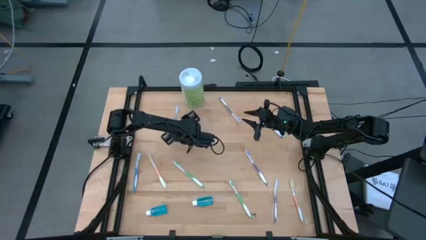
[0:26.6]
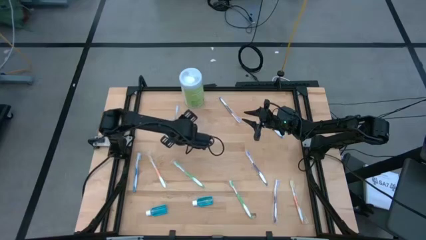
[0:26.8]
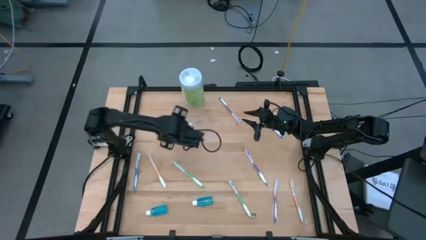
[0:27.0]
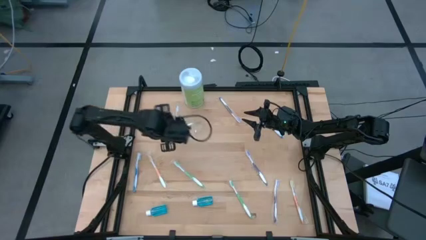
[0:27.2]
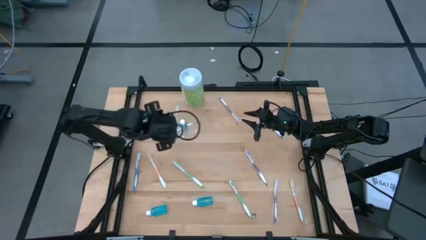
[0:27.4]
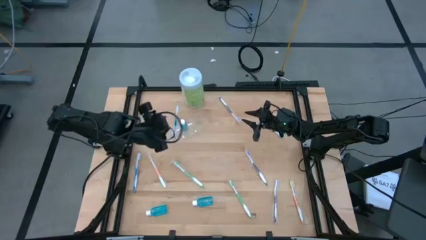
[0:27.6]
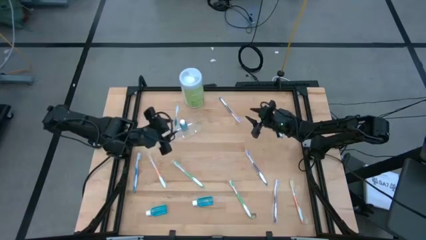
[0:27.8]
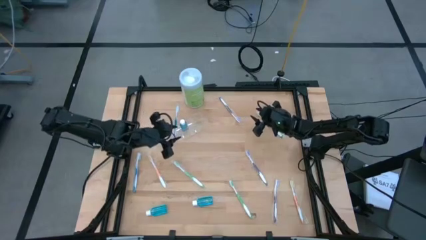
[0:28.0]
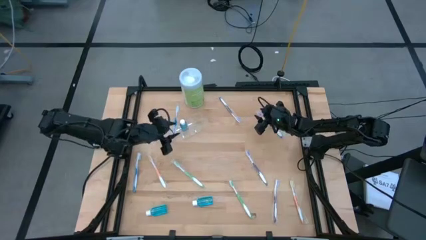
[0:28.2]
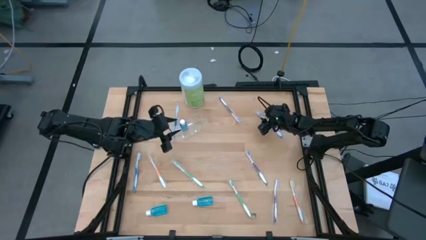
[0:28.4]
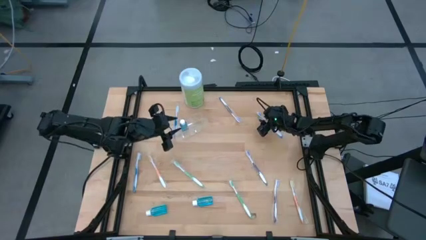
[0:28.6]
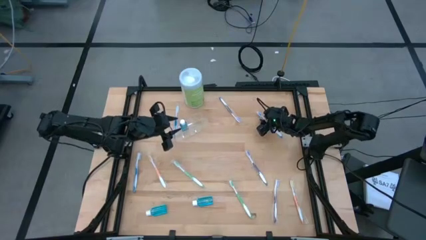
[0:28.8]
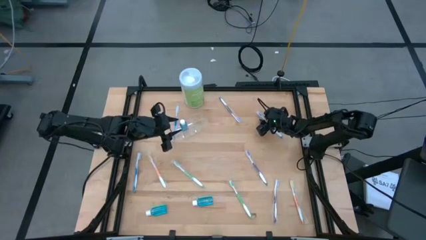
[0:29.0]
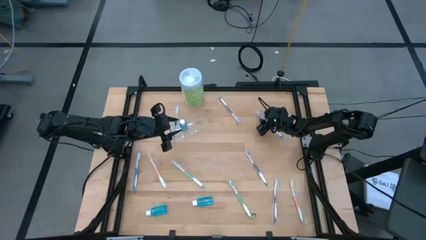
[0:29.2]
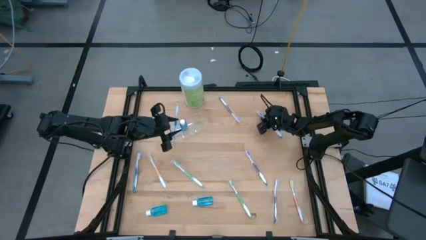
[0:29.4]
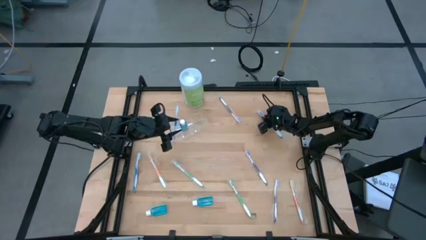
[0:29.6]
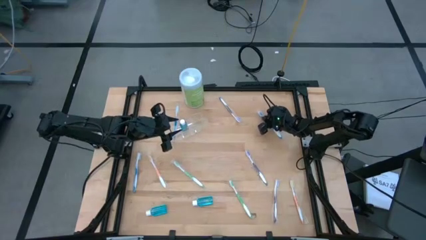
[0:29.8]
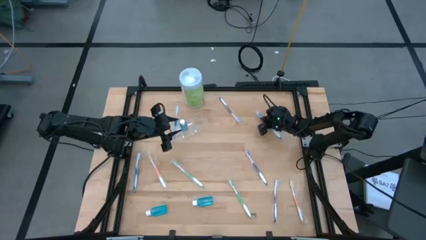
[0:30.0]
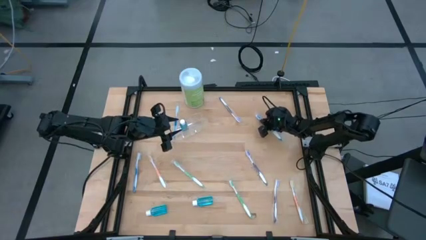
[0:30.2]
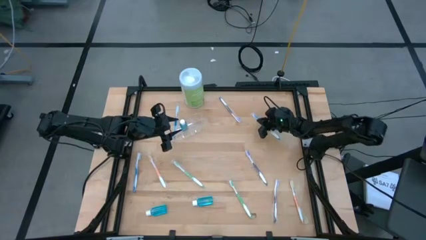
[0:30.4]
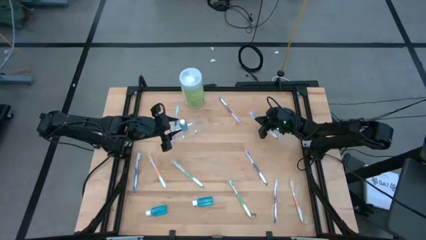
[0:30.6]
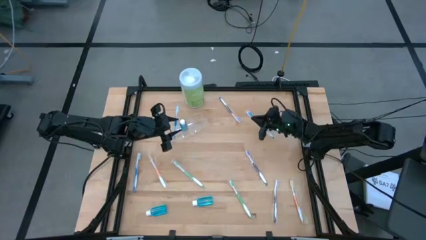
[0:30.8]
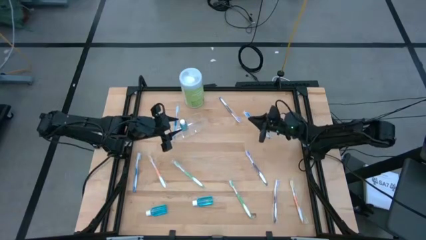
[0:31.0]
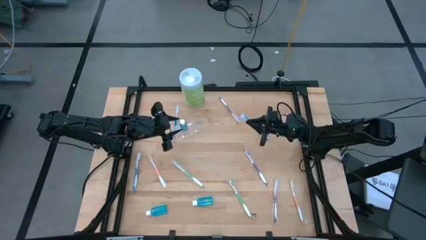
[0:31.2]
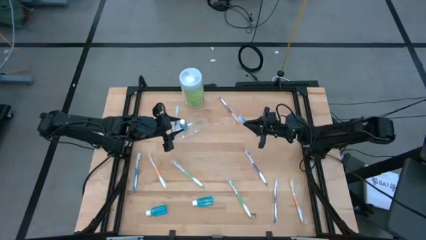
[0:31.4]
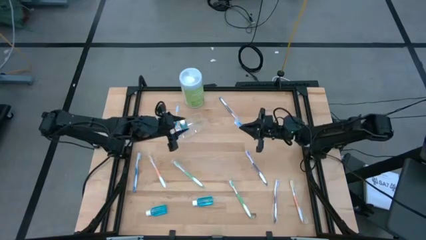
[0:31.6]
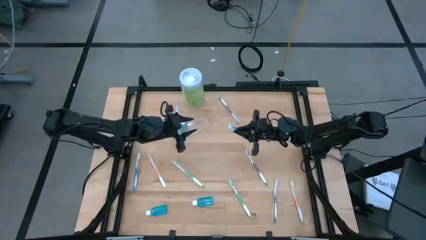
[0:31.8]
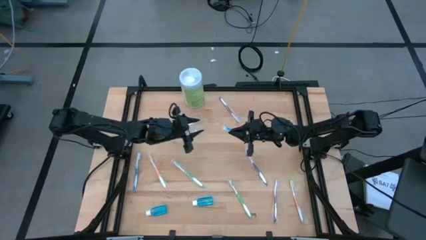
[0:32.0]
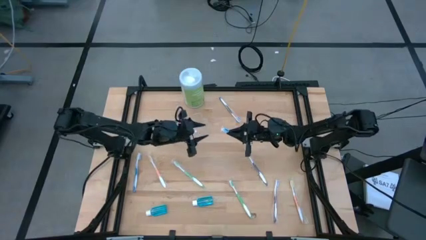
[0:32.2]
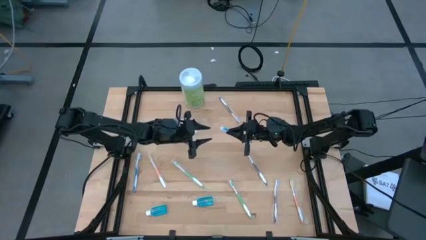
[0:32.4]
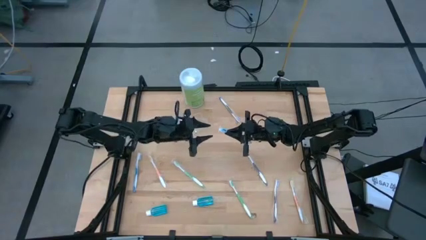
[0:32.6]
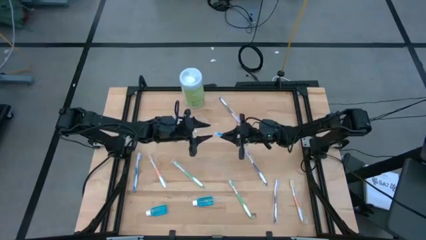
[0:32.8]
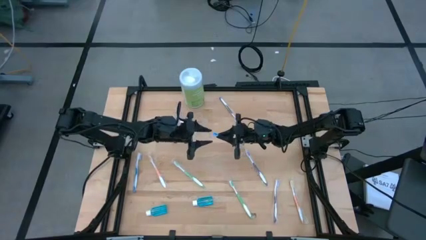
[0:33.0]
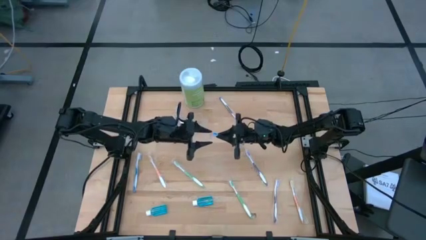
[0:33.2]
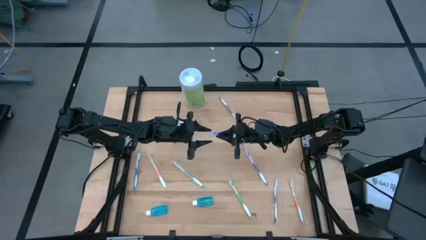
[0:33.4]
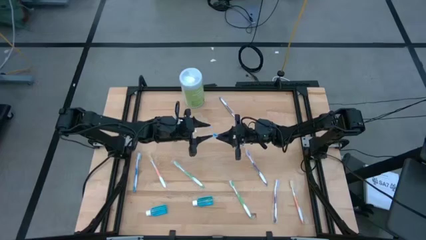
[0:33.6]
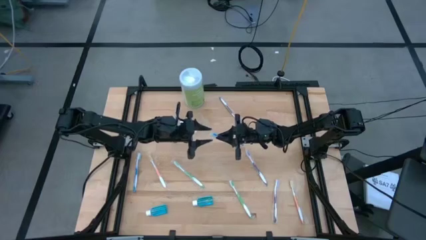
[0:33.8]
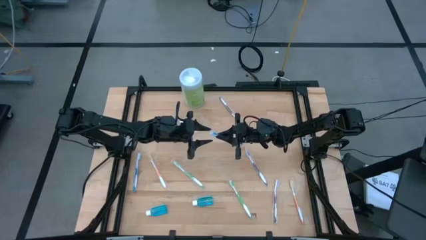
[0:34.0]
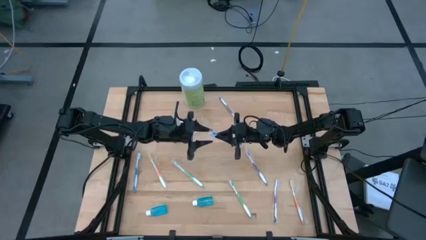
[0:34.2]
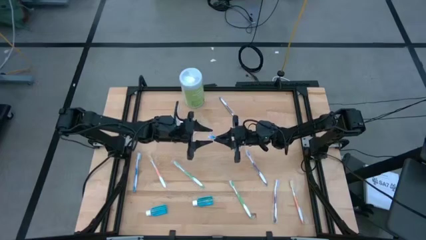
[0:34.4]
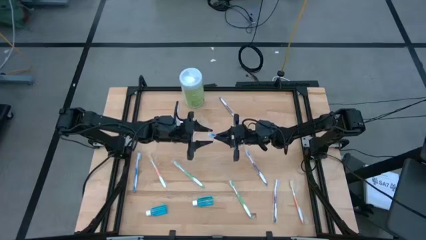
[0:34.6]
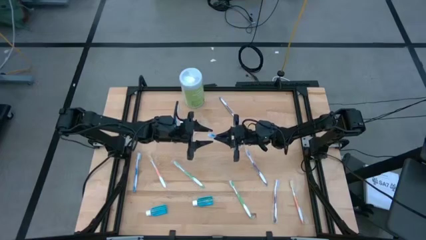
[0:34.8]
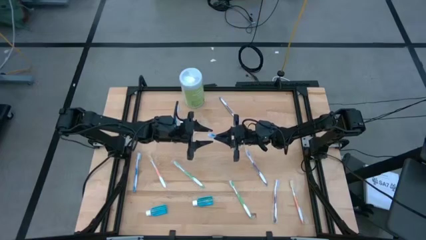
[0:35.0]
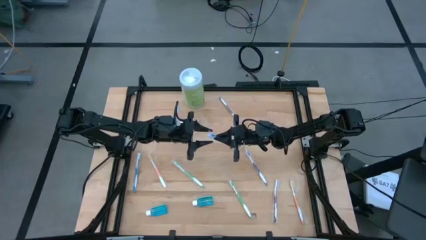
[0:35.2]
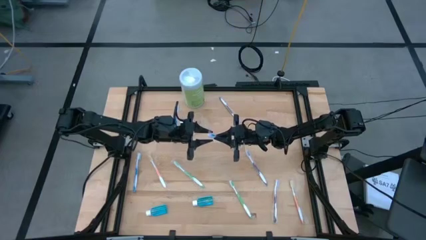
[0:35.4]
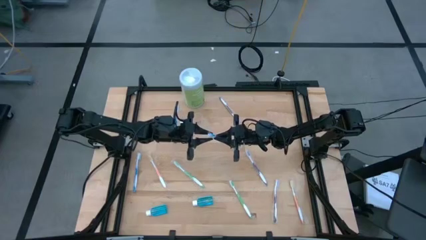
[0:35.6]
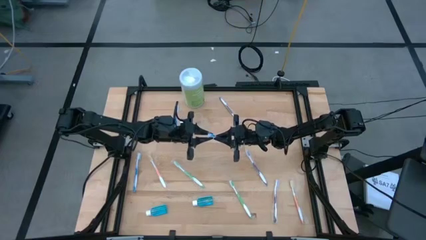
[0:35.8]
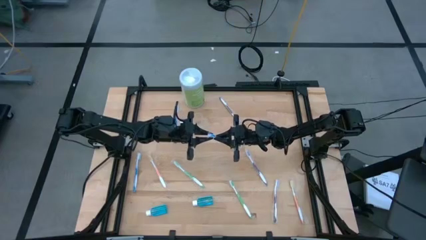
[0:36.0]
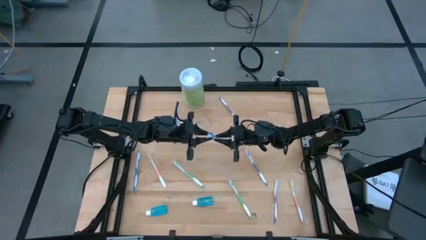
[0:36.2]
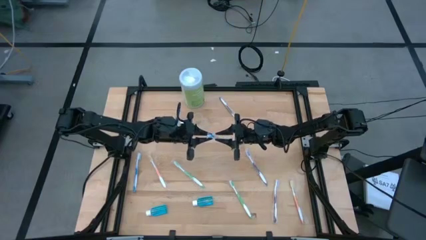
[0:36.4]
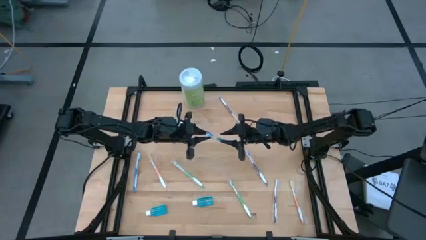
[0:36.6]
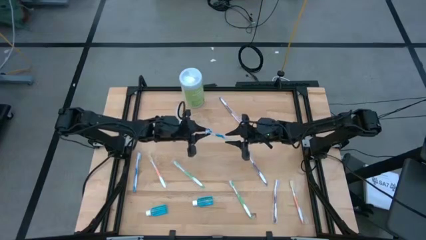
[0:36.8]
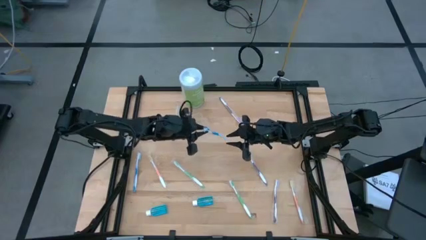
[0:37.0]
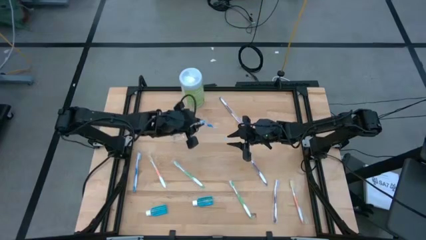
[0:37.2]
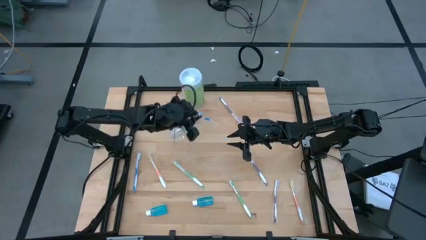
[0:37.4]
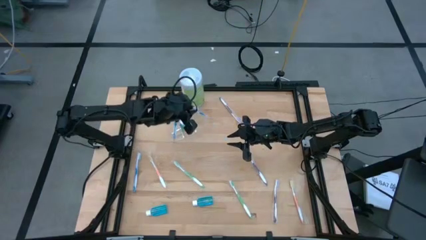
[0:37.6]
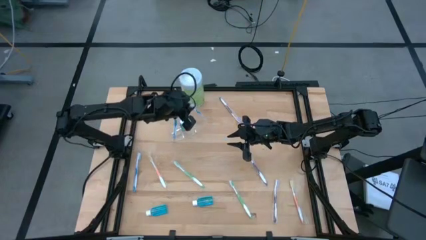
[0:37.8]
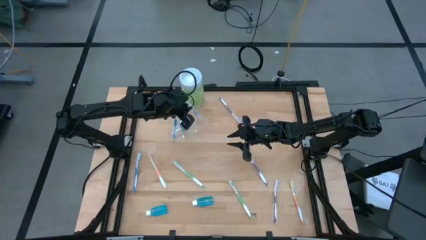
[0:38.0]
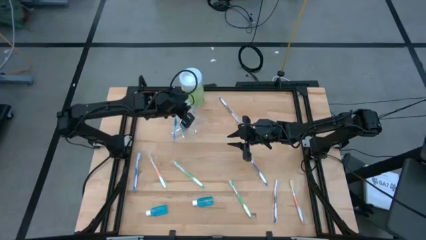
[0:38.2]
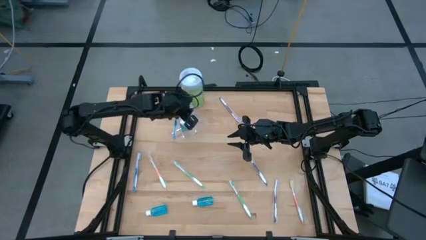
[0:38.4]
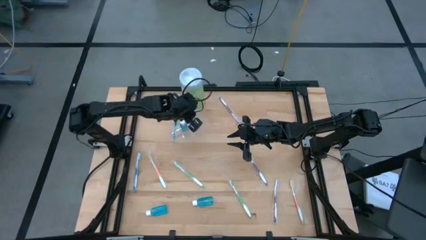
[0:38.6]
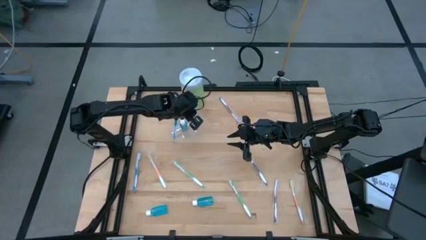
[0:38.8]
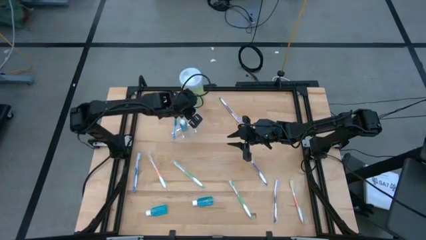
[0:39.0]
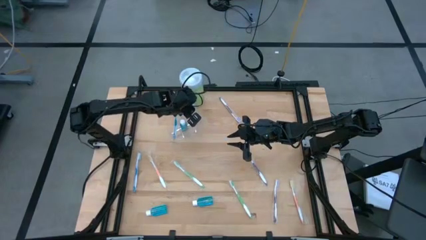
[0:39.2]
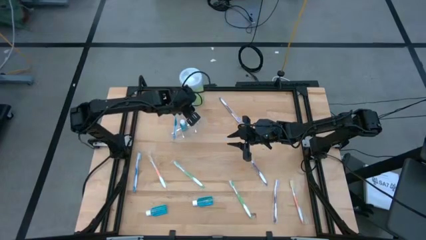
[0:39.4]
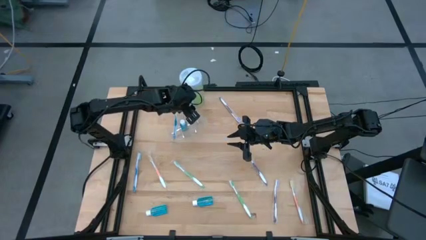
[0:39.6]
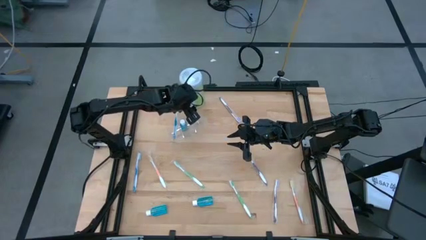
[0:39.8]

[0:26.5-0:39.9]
Task: Pick & Place toothbrushing station
Put the top blue toothbrush into the transparent organizer

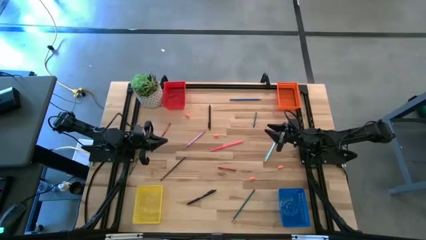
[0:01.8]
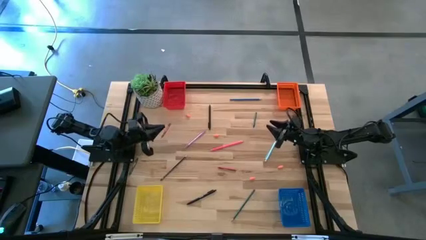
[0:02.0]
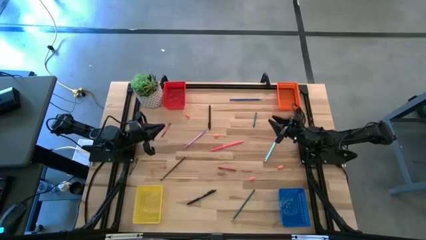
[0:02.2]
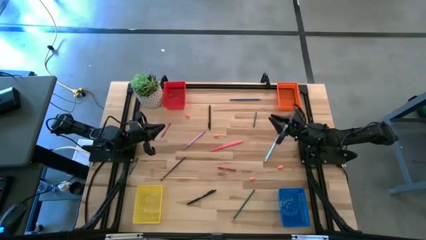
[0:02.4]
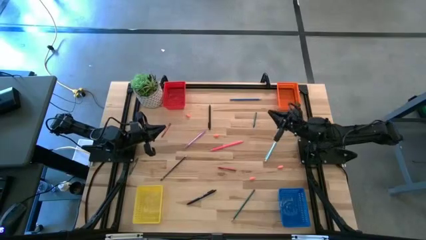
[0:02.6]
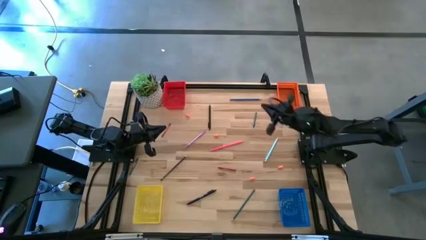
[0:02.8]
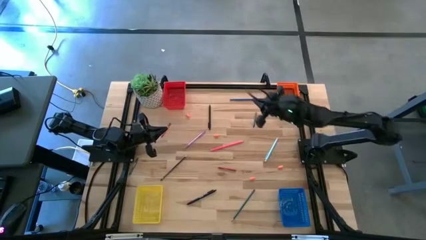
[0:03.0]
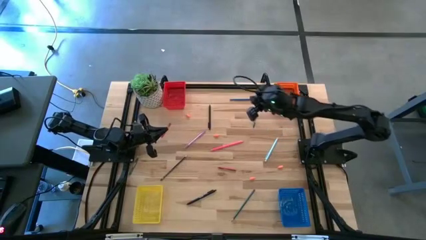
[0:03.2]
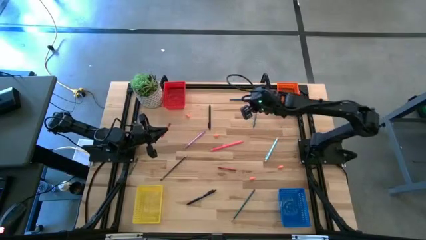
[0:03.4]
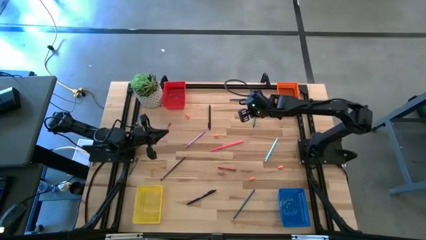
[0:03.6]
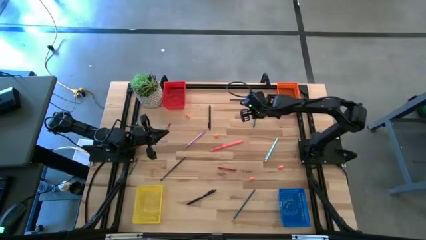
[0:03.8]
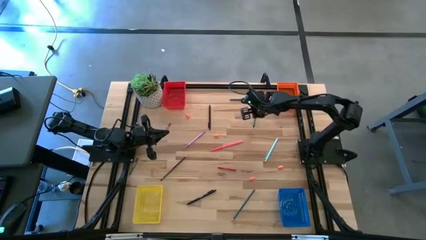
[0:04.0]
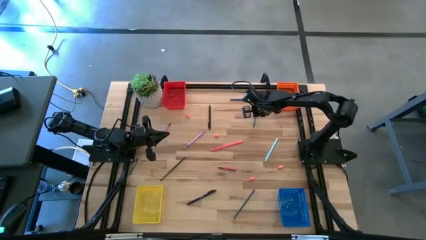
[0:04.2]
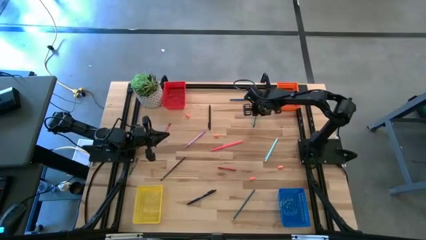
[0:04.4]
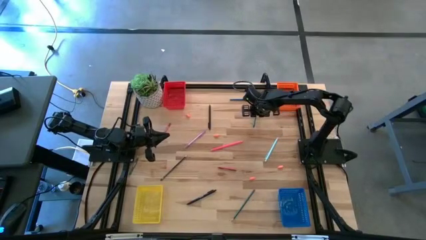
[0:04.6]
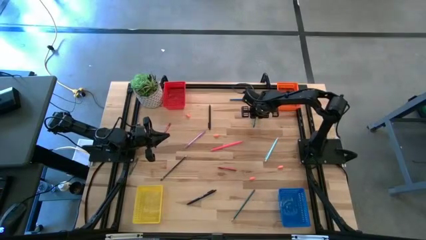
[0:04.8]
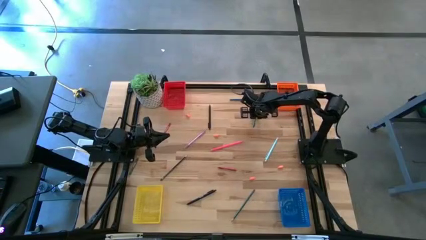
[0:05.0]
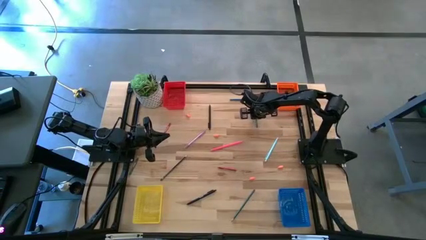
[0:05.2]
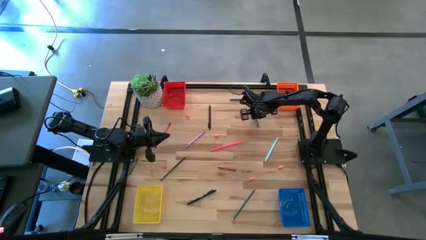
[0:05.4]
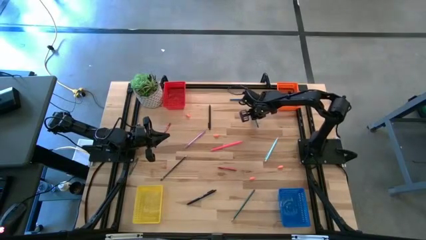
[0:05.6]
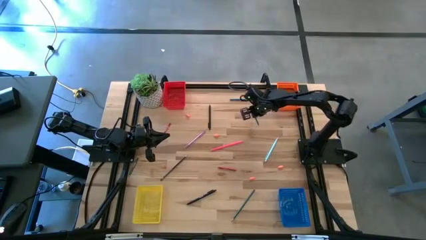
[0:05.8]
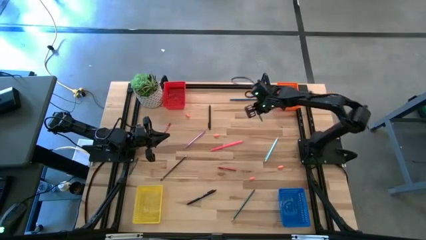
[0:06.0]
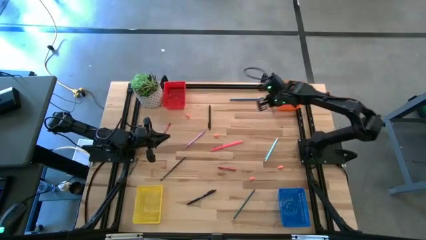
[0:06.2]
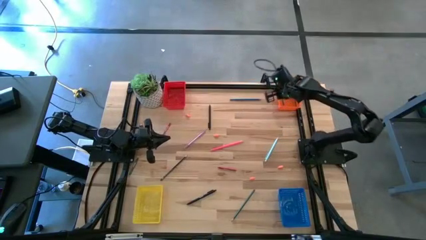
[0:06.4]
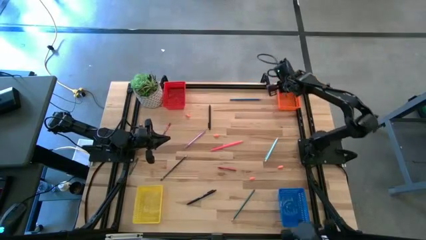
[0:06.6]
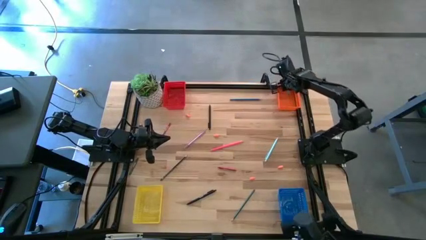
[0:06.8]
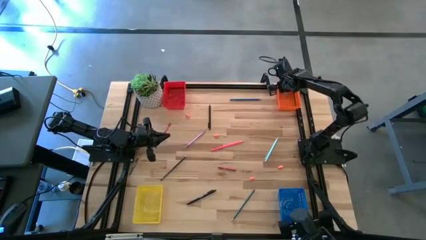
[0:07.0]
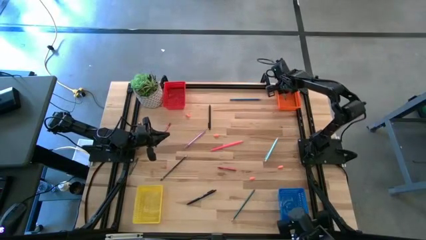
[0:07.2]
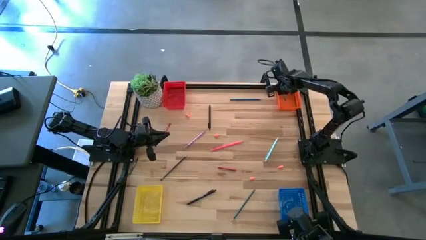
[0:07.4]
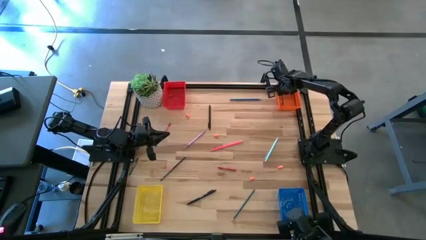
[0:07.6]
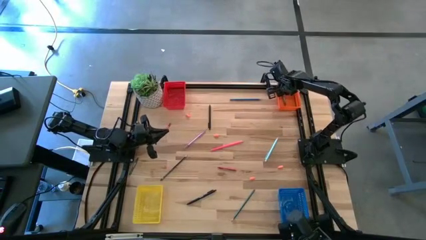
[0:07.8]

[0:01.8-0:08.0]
Task: Sort crayons/erasers/pens/pencils in bins
Put the green crayon into the orange bin
